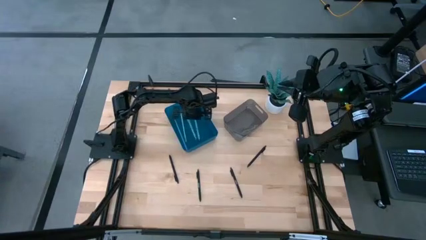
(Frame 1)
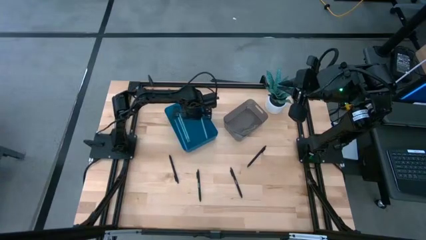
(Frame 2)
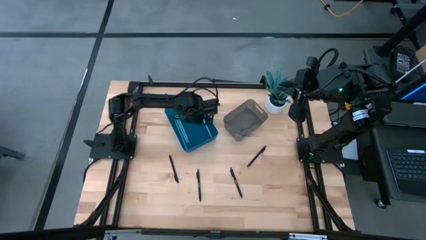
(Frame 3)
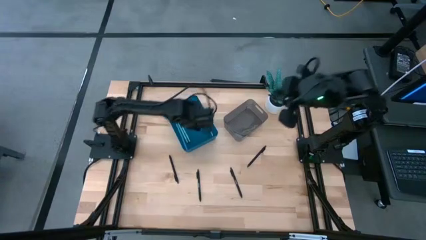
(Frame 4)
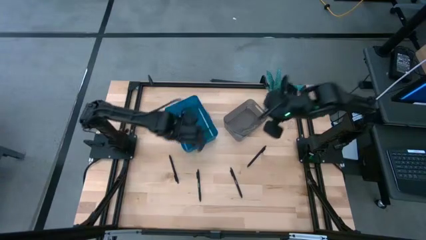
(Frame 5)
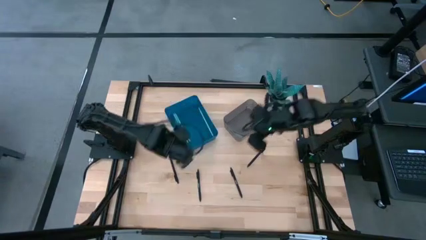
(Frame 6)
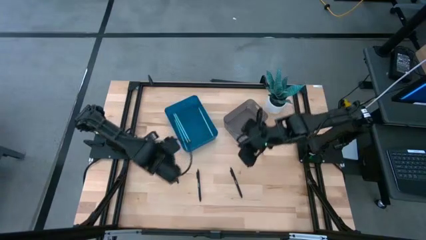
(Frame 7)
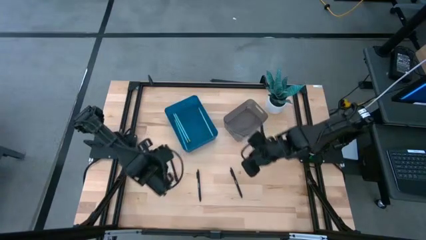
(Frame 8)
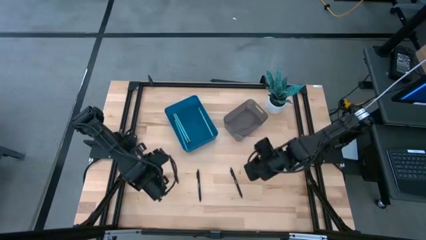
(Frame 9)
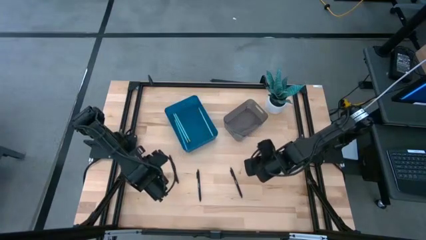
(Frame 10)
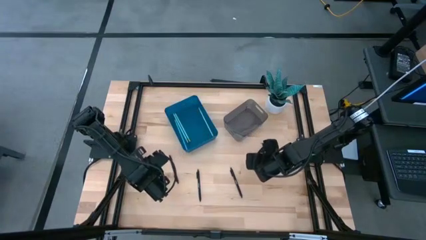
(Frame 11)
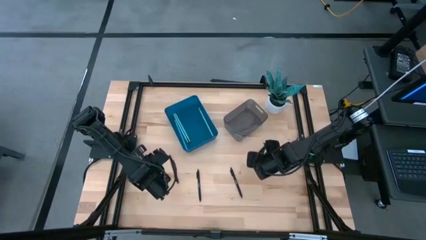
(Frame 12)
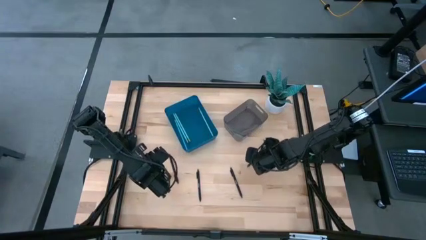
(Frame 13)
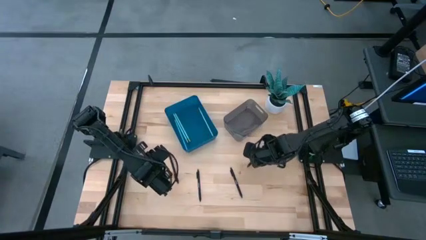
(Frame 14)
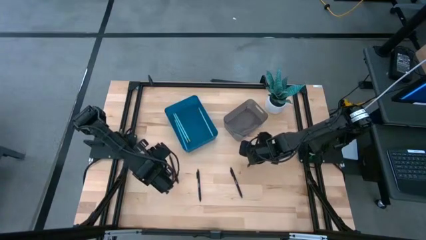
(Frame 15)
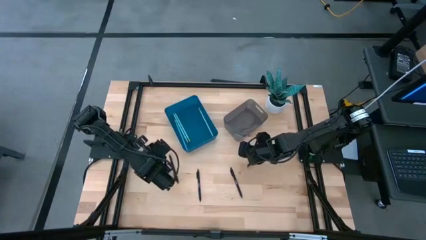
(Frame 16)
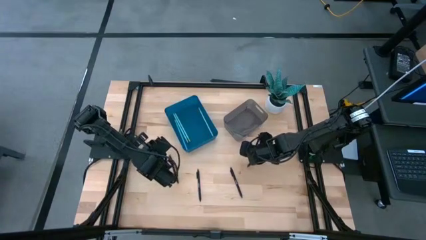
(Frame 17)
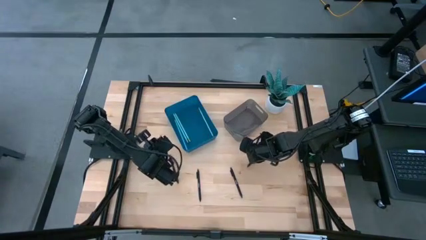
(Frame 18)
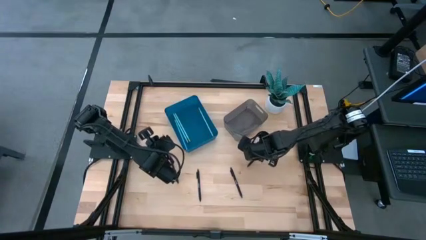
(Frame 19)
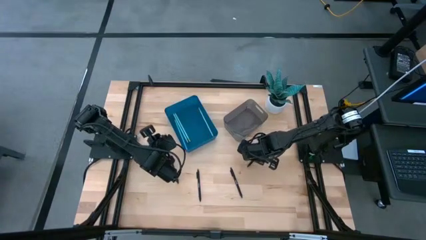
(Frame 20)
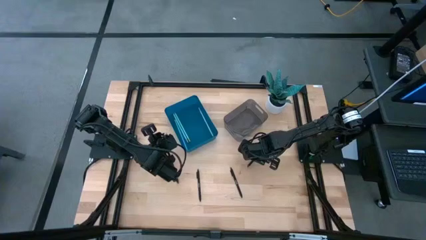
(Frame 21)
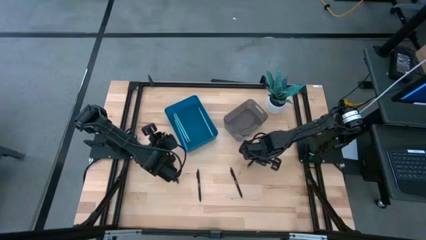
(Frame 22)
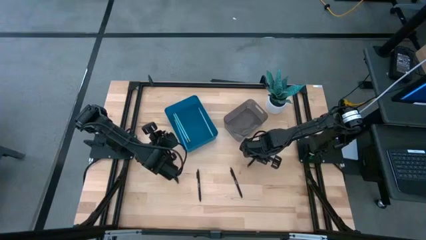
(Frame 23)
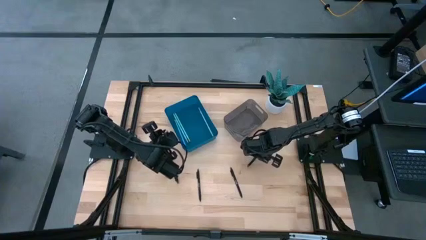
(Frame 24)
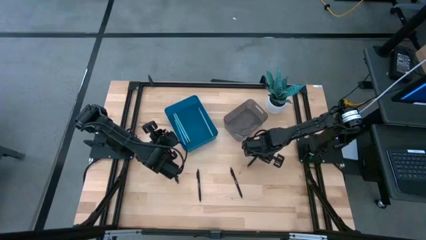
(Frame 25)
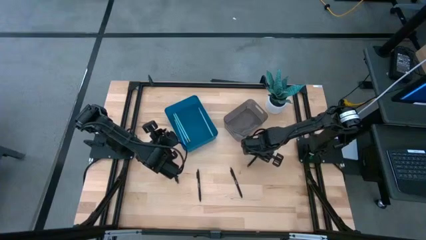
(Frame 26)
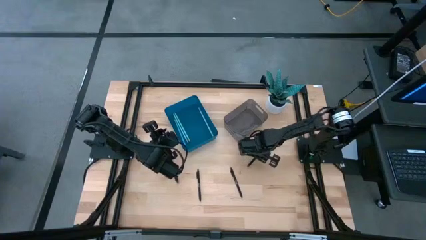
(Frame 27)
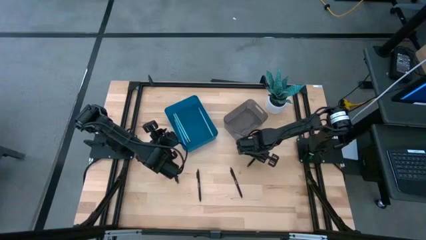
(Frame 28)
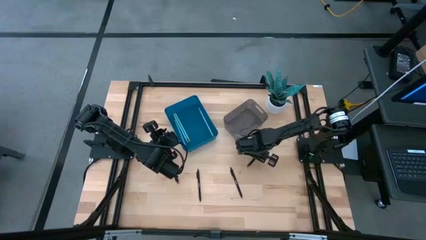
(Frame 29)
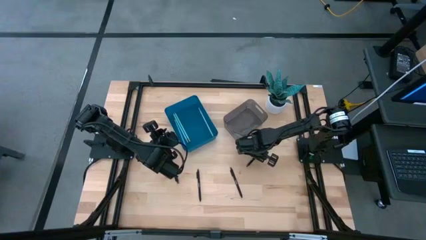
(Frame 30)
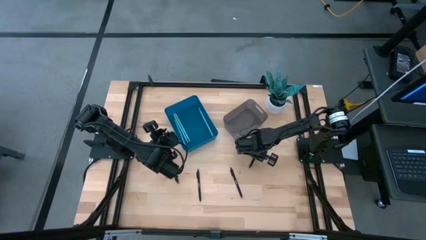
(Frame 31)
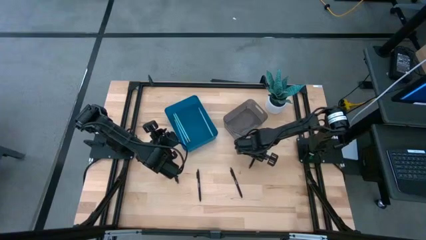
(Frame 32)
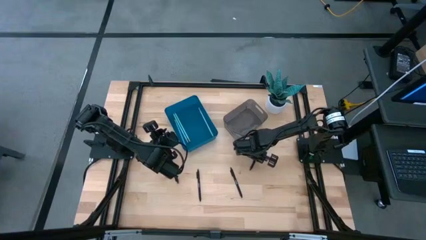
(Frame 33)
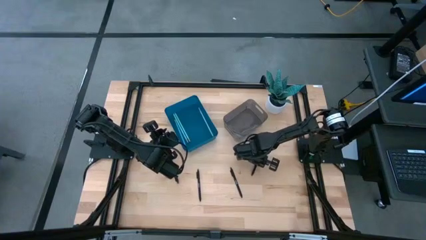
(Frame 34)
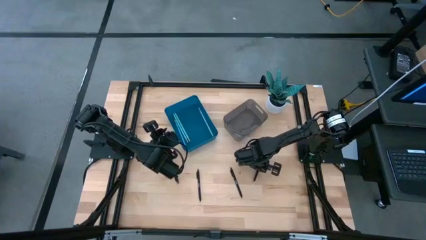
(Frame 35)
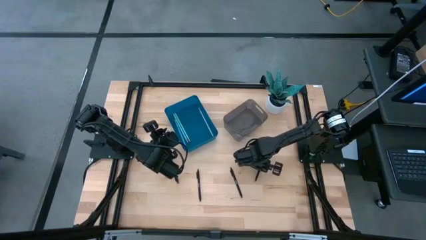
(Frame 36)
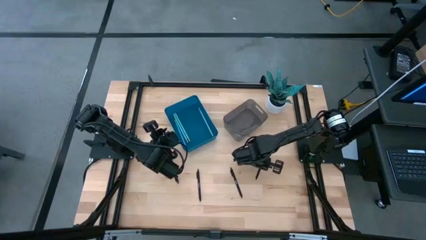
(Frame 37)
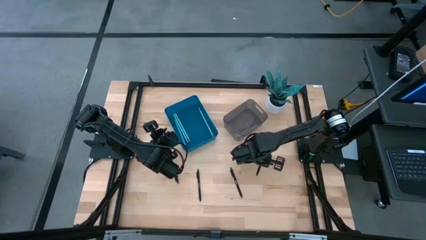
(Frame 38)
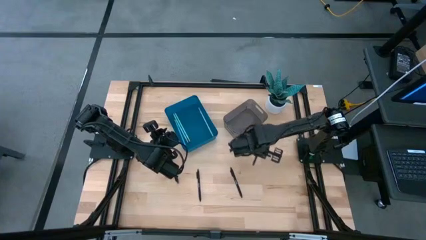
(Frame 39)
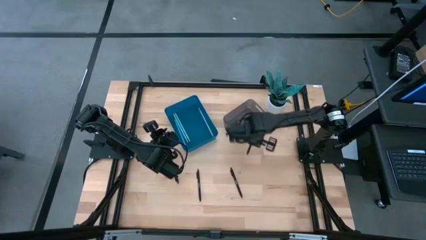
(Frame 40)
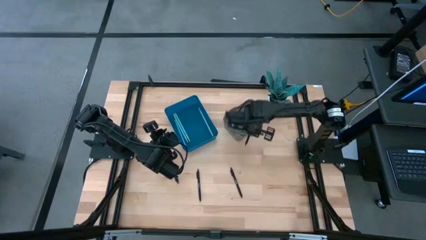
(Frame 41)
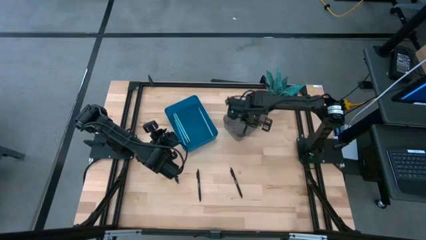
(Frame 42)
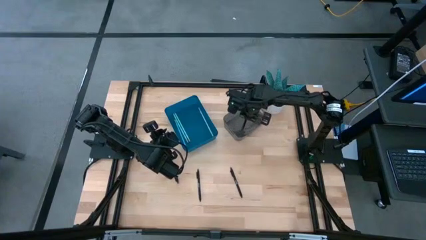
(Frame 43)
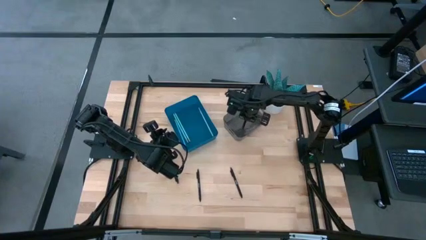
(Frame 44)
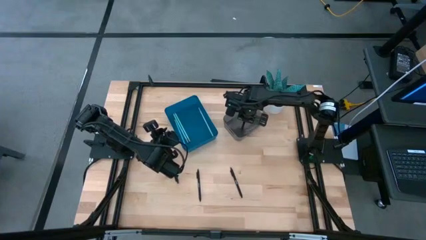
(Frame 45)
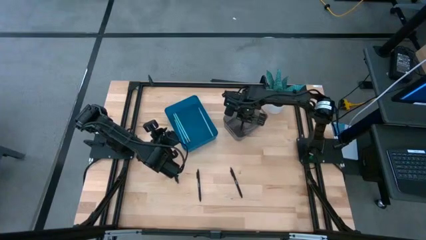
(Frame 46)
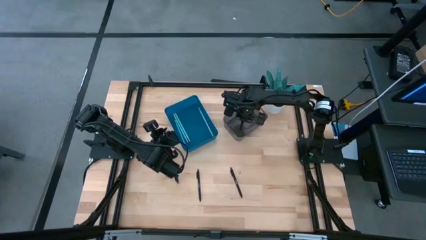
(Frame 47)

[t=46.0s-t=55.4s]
Task: Sort pens & pencils
Put the top right black pen into the gray bin

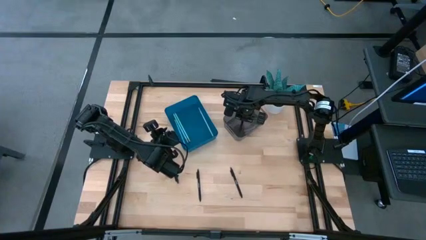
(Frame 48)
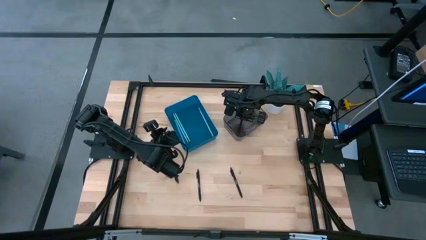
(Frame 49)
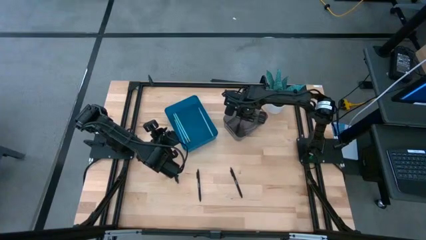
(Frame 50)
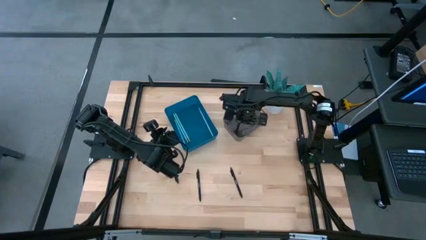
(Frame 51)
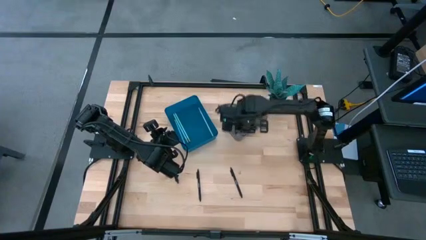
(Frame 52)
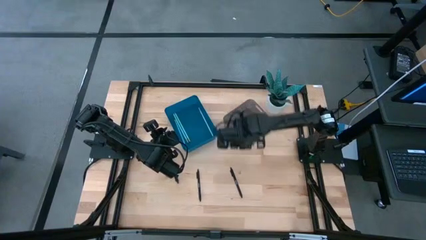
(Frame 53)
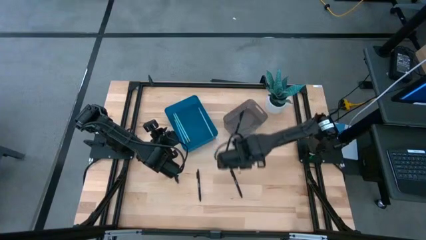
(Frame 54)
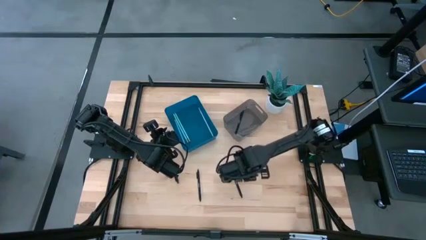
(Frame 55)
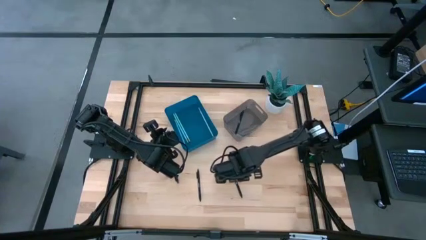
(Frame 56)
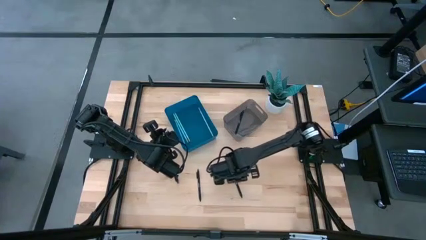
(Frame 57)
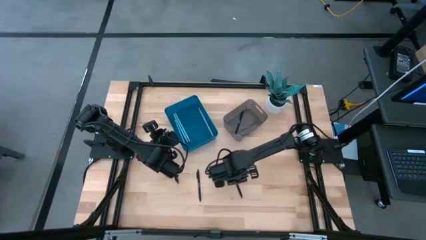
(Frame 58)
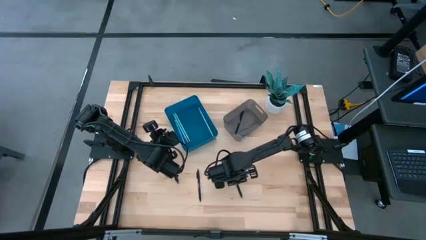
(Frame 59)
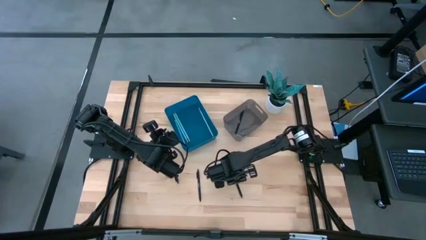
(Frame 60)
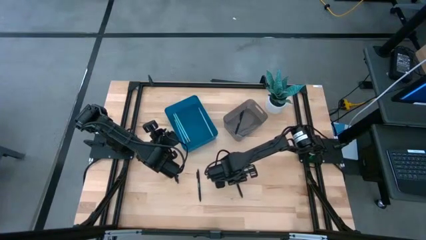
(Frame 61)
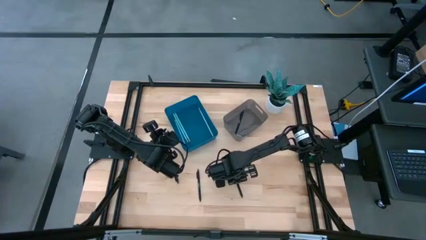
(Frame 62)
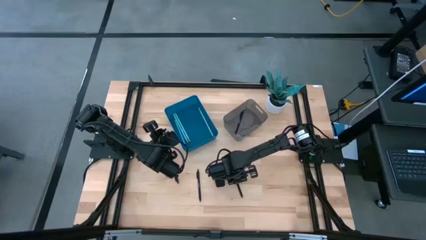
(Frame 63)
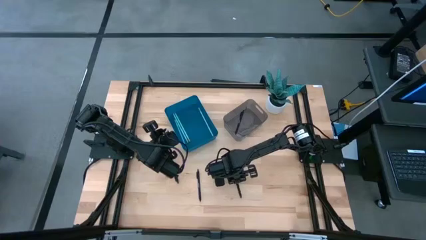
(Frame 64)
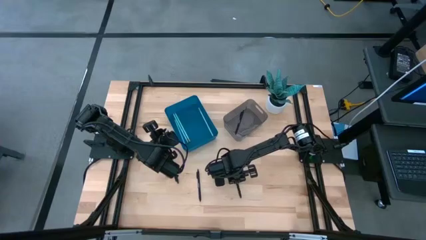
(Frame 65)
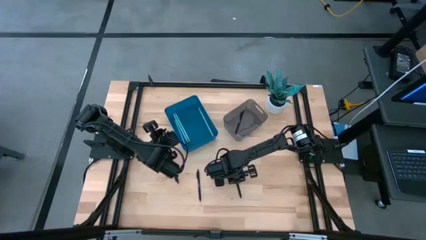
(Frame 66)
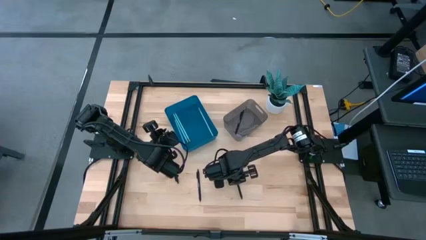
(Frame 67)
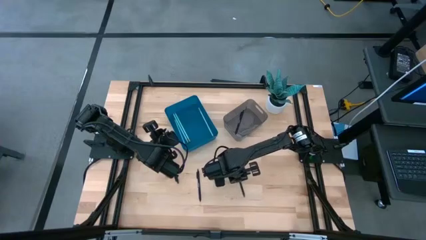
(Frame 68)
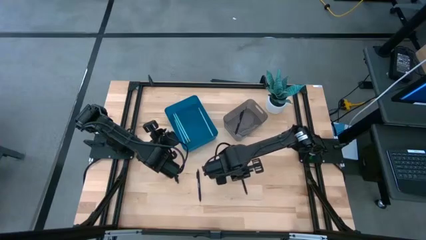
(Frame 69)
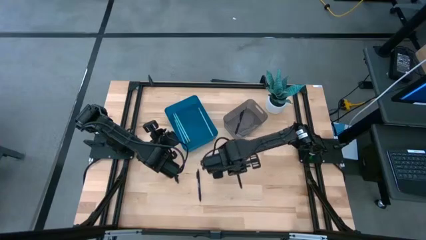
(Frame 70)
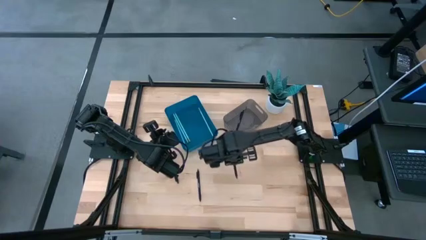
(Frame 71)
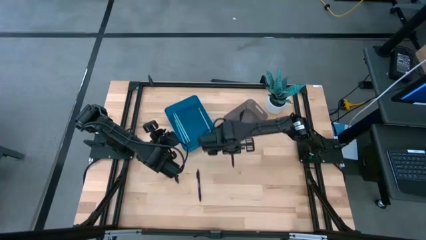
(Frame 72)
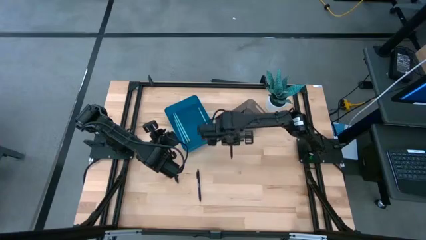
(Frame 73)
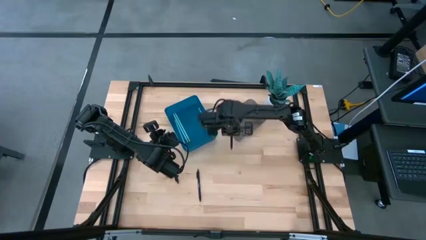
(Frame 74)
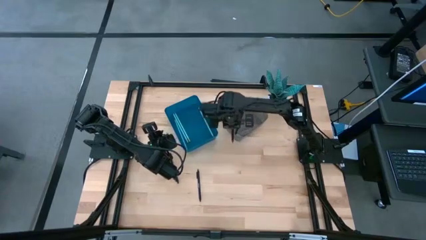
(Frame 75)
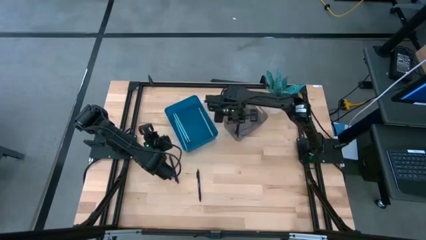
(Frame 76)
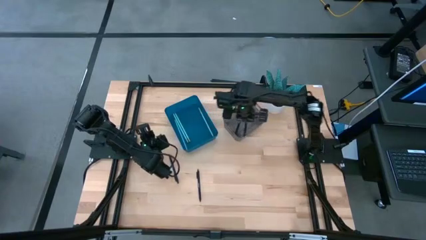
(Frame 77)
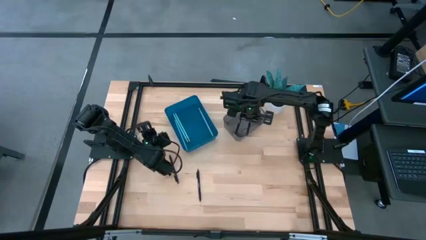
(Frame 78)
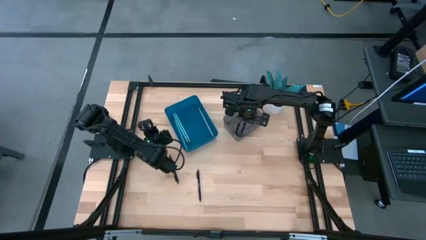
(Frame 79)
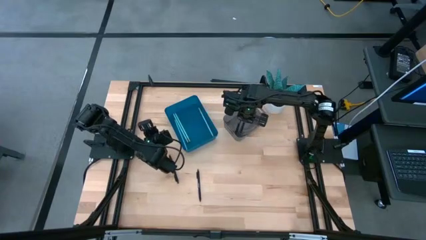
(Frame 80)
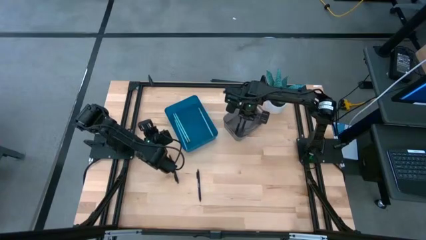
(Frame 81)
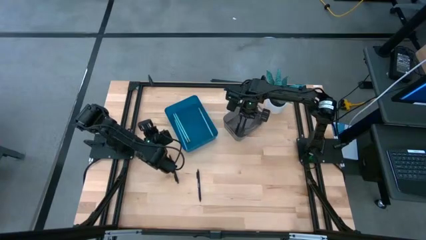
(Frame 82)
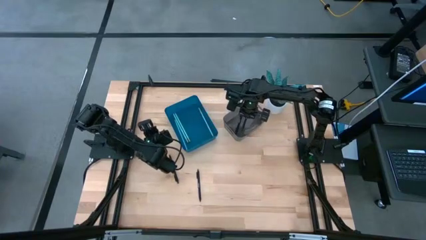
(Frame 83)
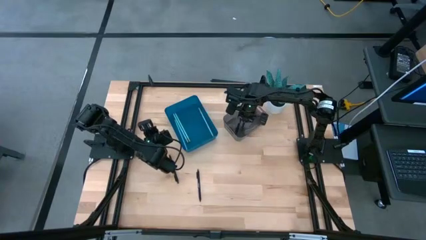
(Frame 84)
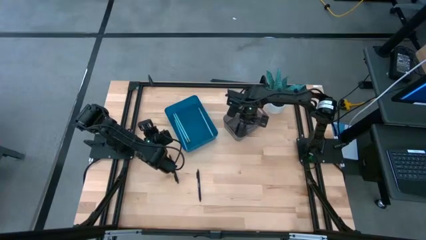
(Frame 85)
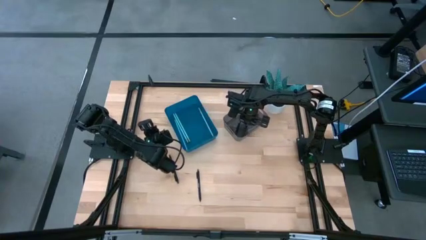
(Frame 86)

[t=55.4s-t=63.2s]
Put the right black pen into the gray bin
